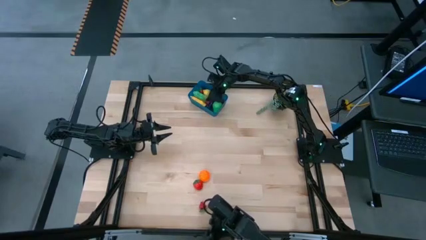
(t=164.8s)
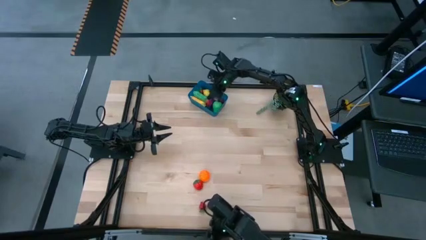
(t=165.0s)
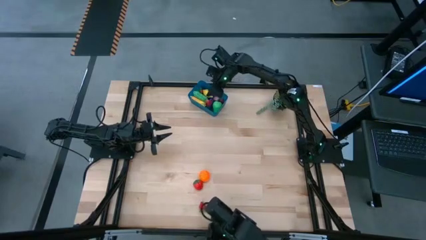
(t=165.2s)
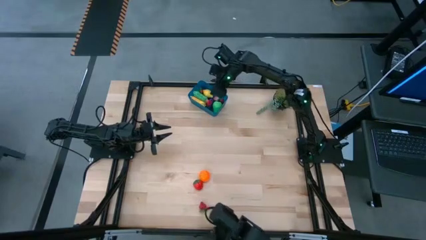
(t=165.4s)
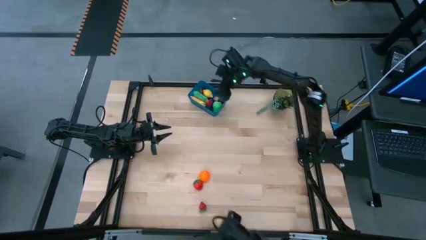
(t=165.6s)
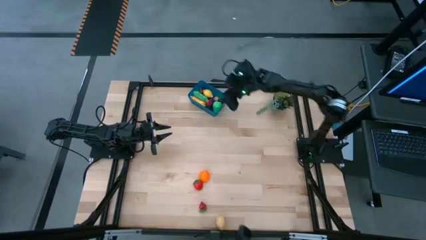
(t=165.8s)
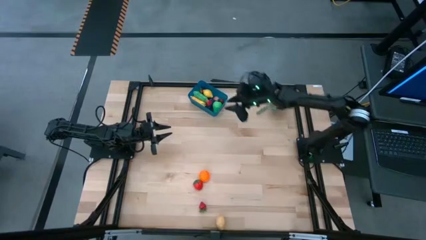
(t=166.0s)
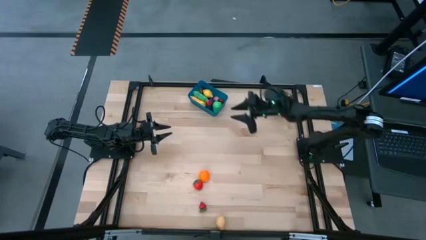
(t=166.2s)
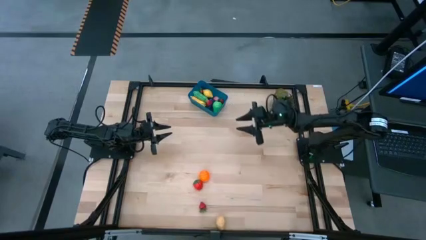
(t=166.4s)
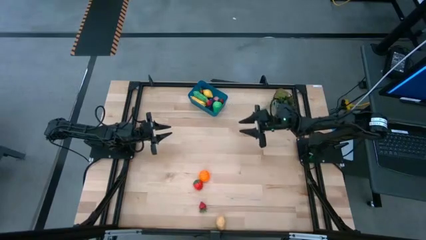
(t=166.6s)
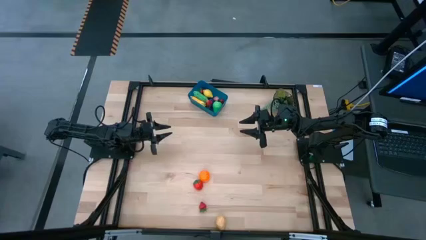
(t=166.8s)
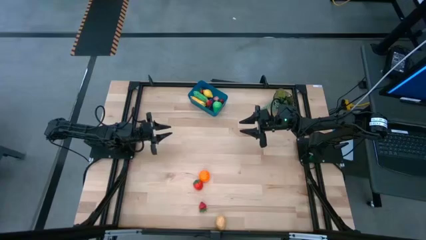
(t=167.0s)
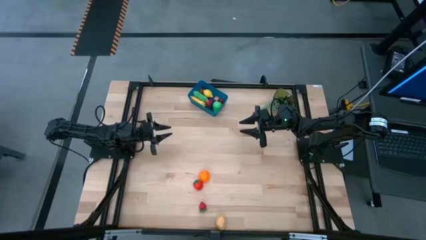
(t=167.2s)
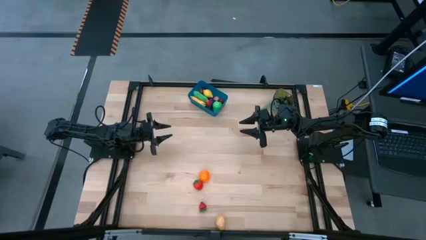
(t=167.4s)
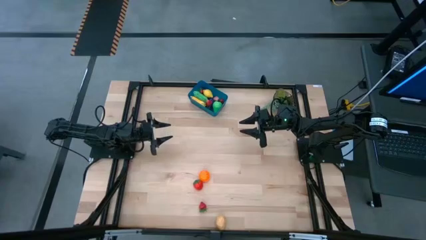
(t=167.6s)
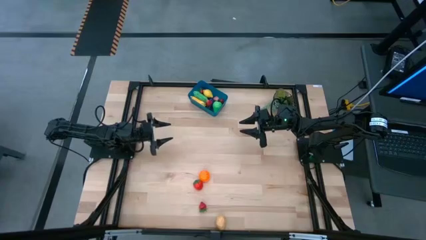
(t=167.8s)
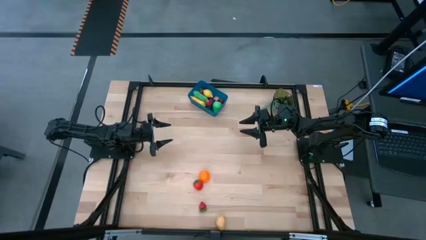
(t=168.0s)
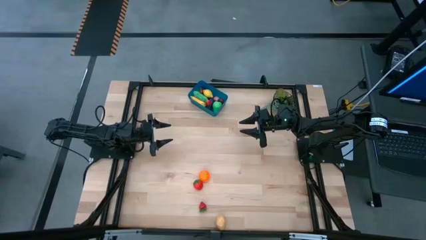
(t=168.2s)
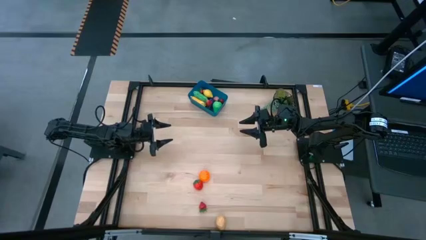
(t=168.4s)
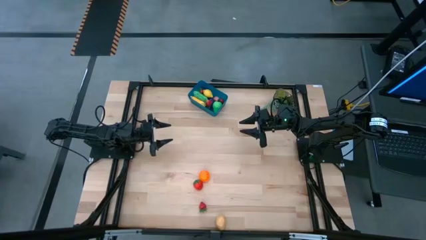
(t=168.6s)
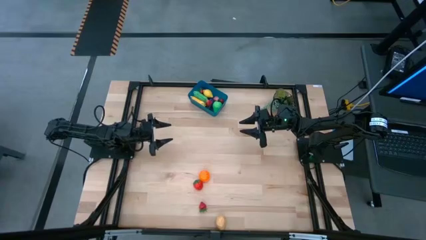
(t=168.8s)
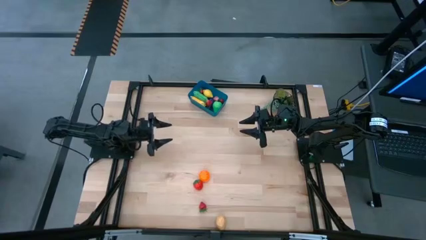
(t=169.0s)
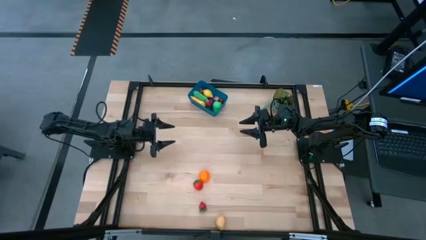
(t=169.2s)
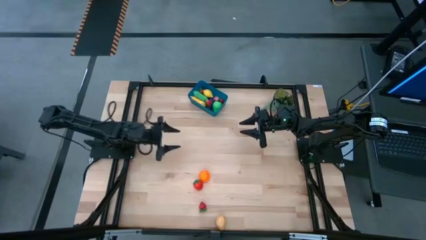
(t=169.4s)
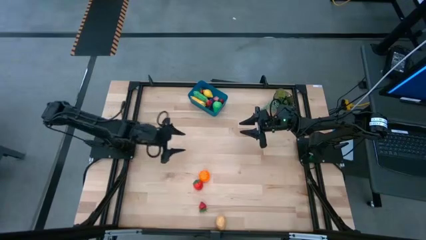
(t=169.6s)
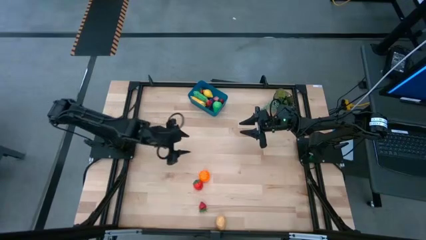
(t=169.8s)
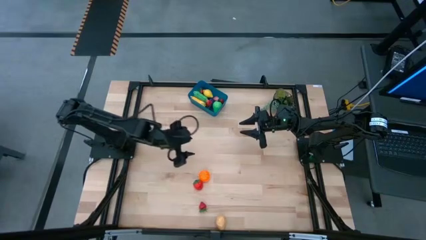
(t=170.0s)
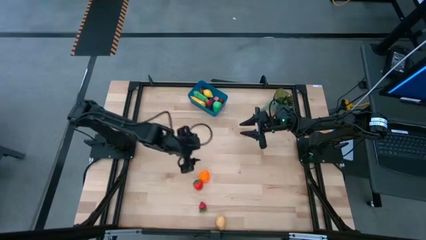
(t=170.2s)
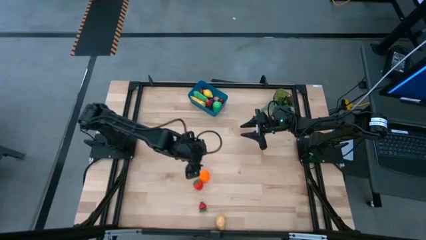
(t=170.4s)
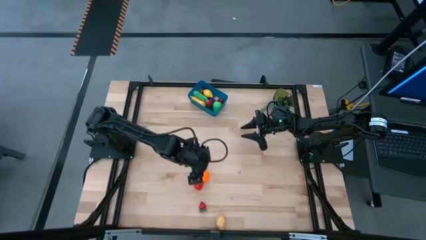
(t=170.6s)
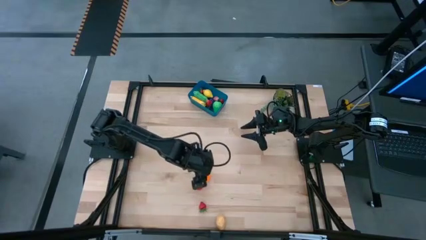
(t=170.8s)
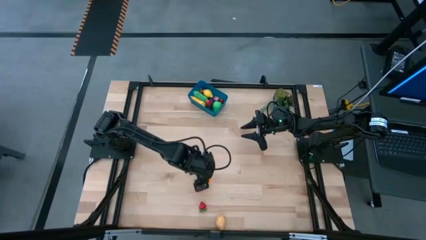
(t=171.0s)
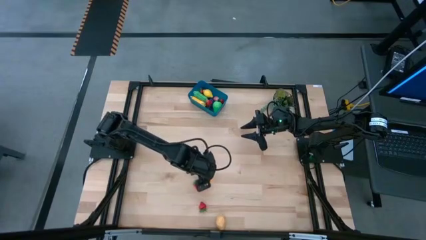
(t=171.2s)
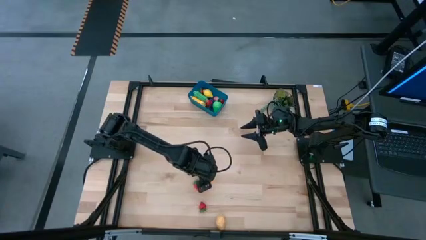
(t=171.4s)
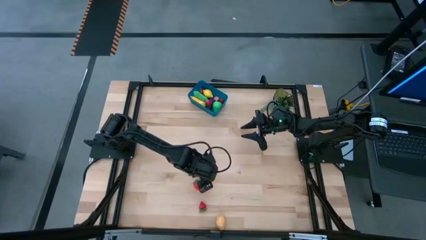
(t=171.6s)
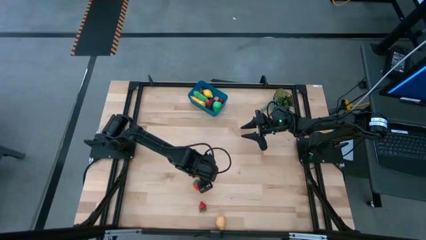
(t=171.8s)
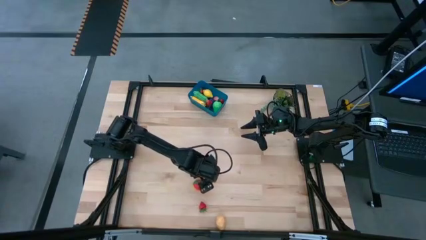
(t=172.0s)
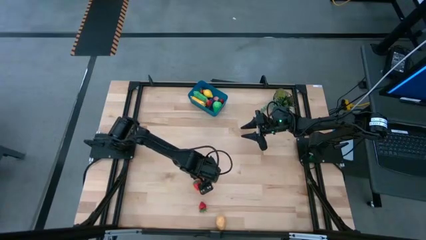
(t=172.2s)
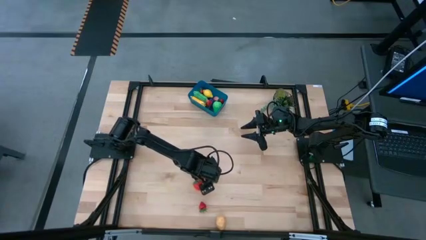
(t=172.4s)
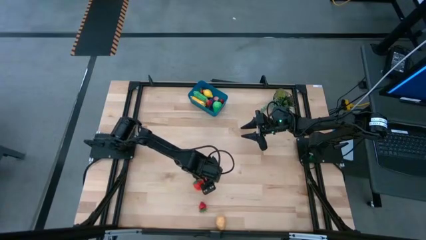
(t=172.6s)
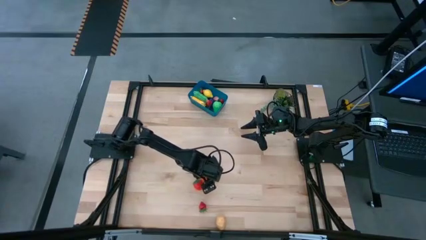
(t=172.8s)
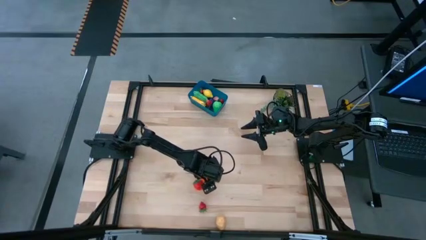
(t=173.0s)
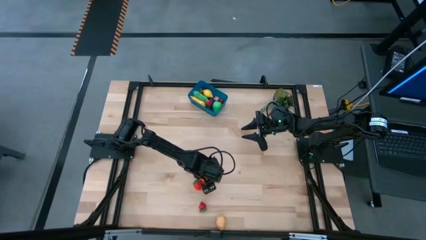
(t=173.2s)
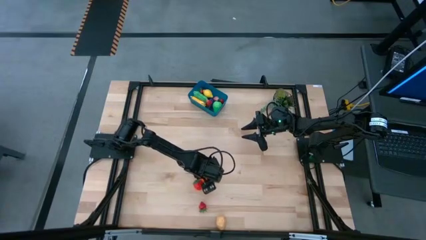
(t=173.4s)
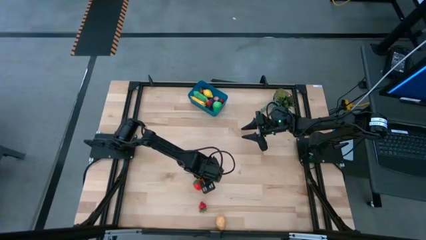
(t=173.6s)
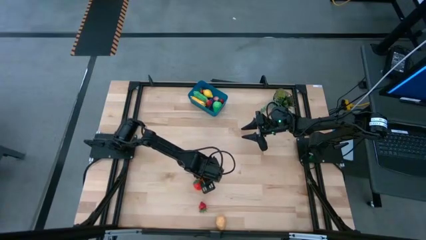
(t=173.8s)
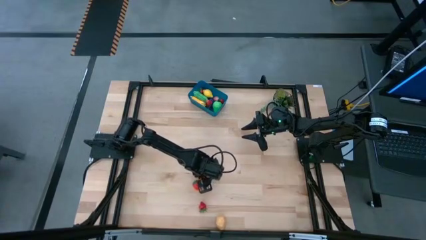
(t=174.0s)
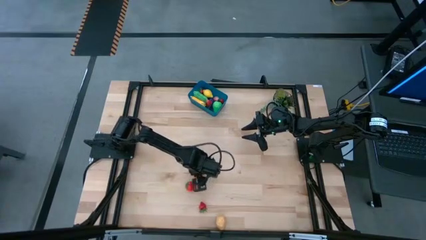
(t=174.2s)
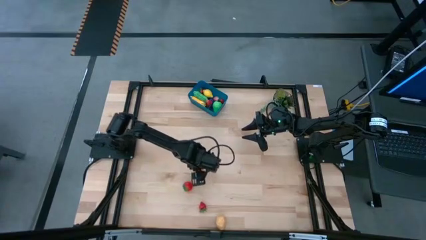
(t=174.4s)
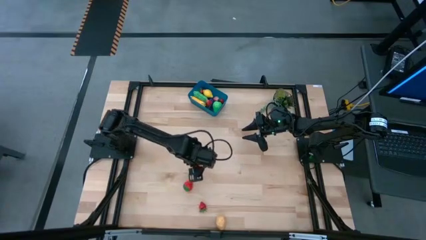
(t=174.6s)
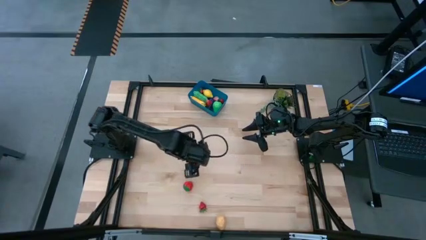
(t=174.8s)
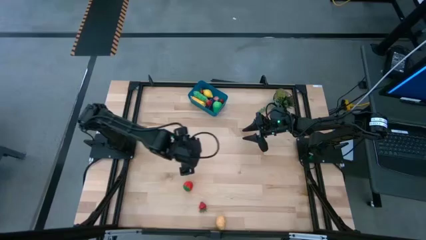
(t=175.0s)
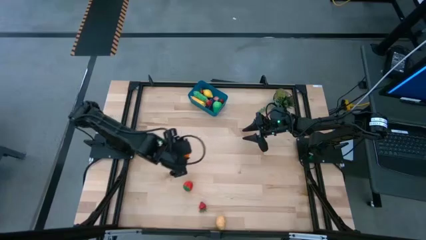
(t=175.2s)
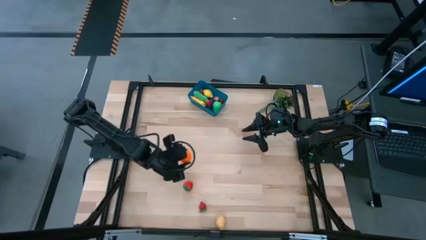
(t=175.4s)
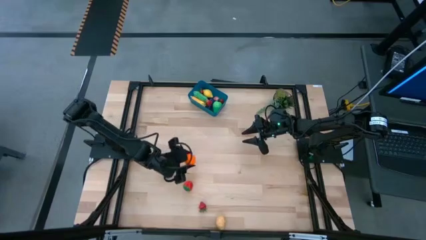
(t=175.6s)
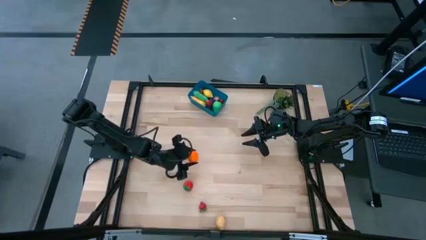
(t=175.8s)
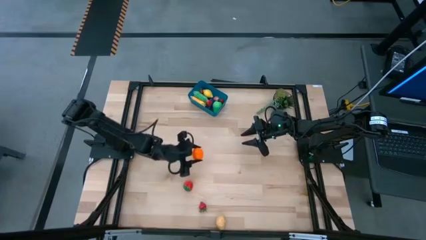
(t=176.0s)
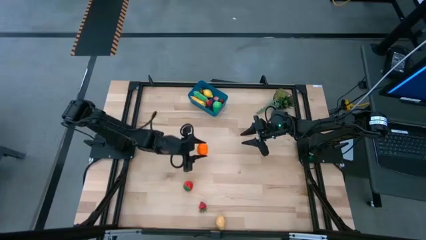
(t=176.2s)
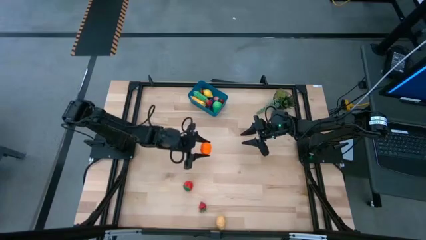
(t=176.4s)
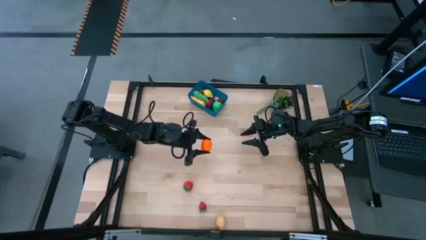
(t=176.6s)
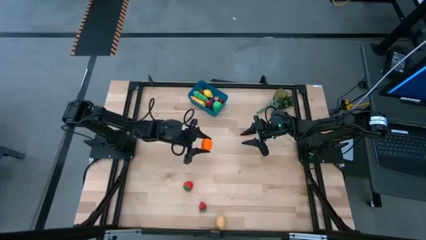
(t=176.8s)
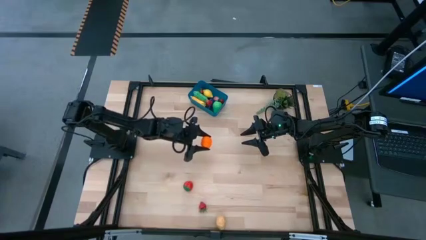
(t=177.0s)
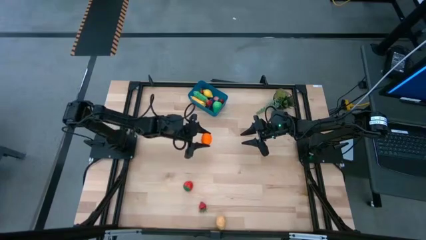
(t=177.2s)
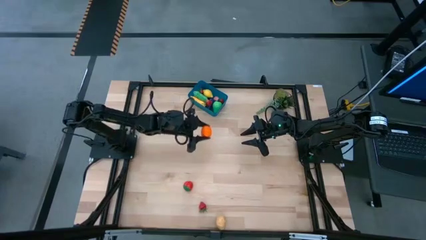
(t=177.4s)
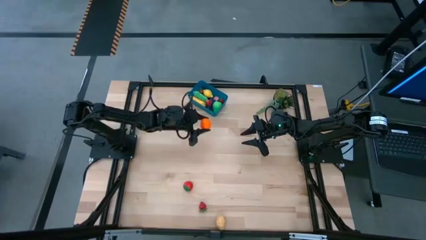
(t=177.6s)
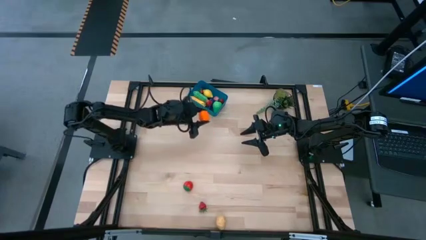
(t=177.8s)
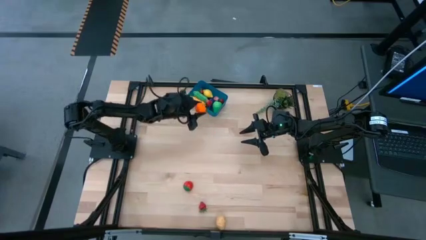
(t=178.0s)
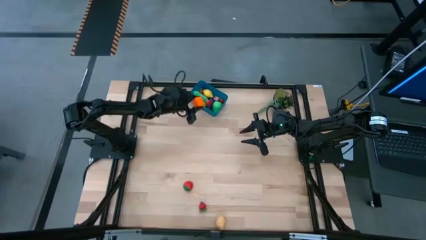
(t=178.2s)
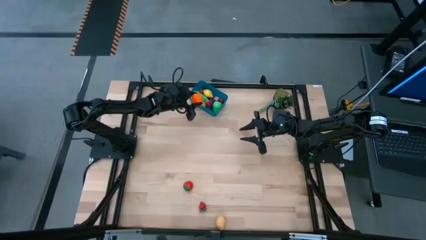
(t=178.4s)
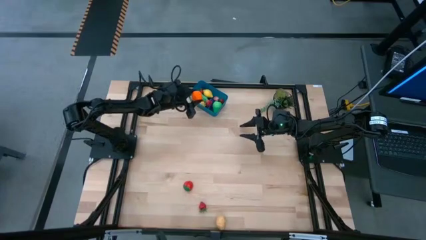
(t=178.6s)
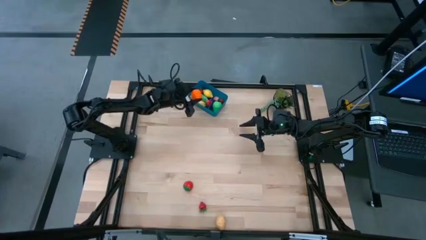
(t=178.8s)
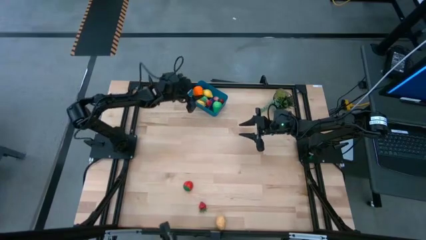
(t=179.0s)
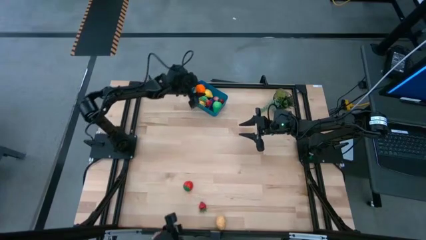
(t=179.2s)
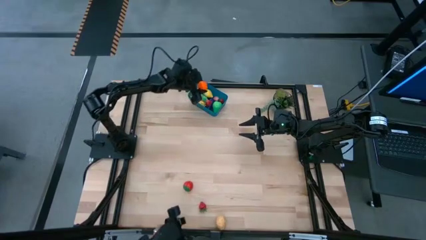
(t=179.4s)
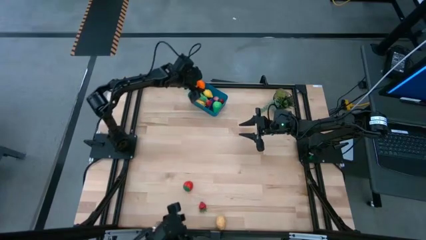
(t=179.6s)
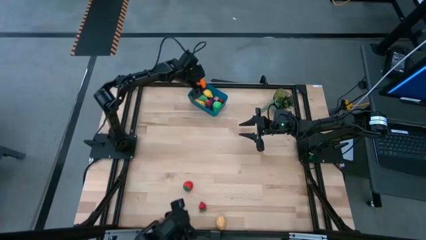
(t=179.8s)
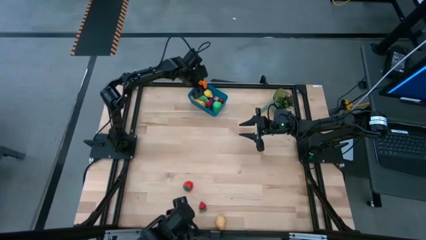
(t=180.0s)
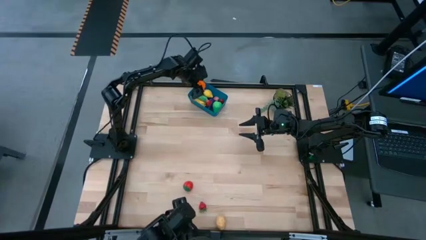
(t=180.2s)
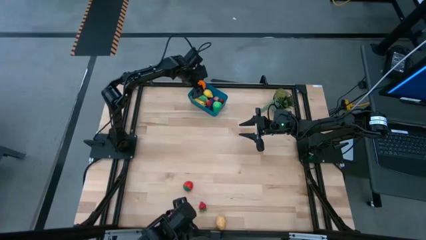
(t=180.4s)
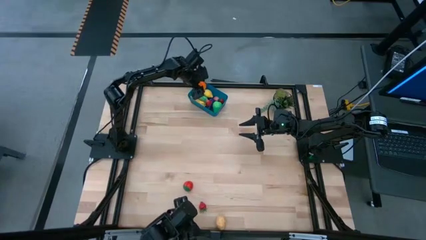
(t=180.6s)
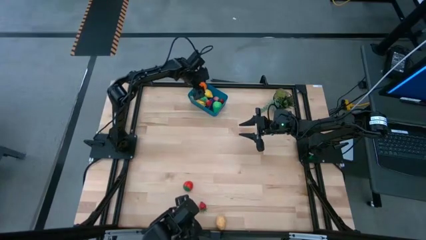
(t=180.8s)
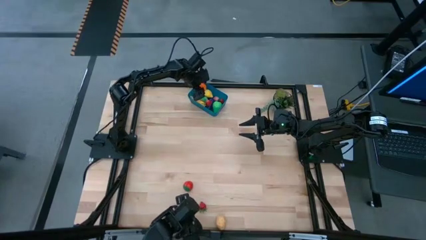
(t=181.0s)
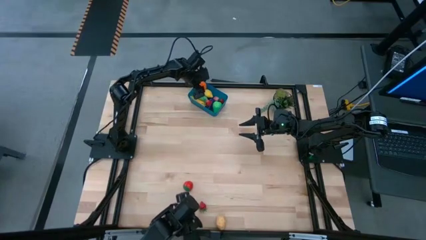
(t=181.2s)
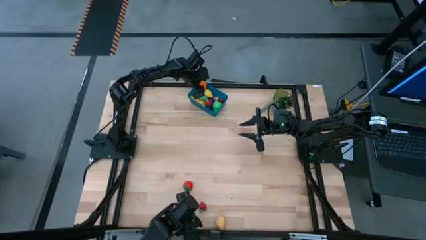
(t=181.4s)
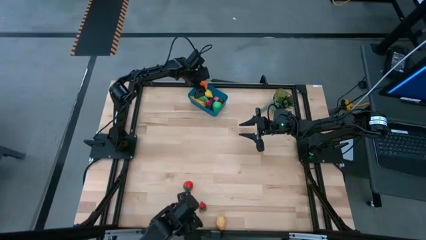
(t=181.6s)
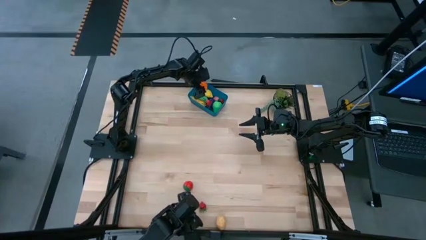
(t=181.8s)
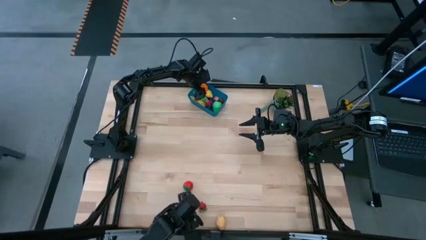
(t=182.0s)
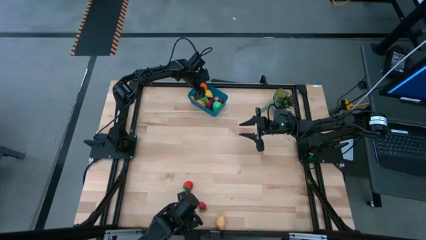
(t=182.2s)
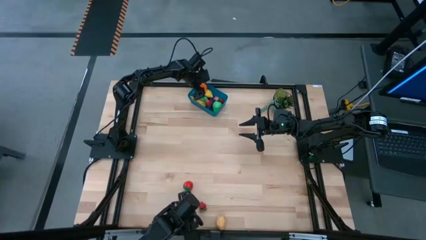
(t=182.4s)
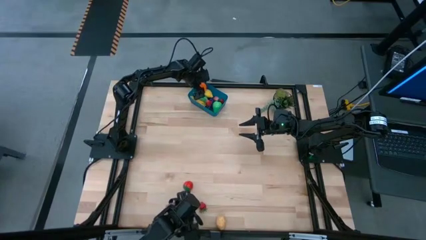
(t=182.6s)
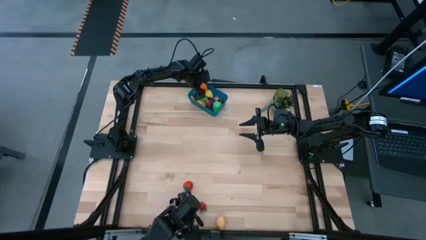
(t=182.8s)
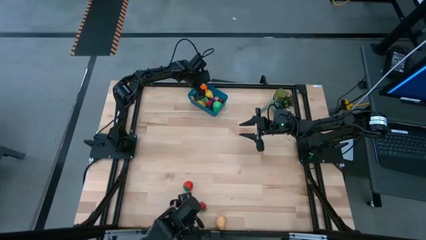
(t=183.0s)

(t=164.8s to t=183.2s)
Task: Pick and placing Produce into tupperware
Put the orange pumpkin into the blue bin
